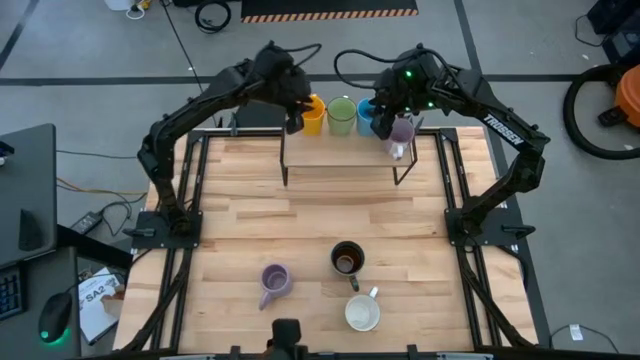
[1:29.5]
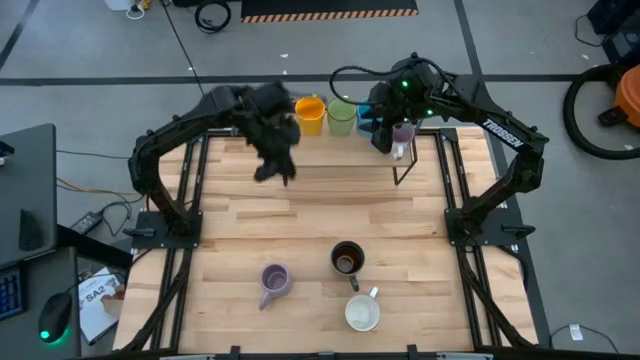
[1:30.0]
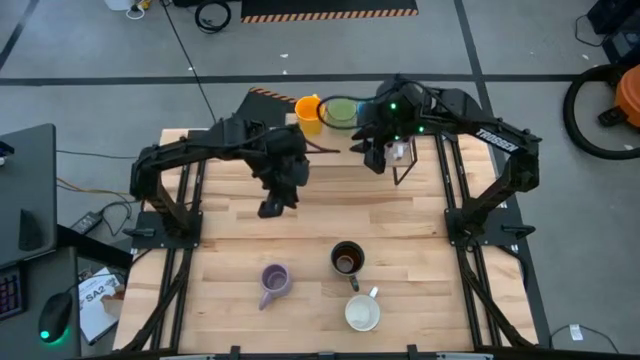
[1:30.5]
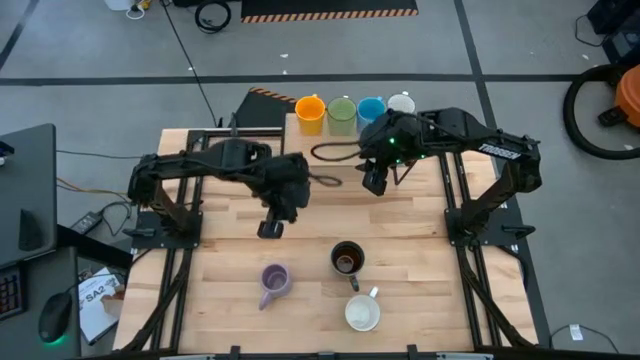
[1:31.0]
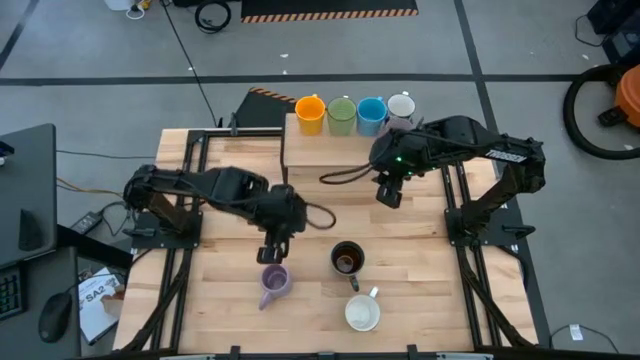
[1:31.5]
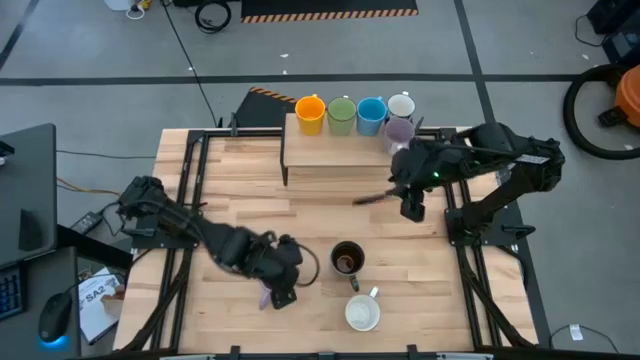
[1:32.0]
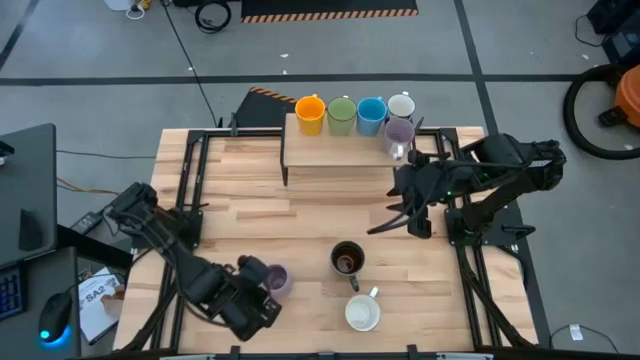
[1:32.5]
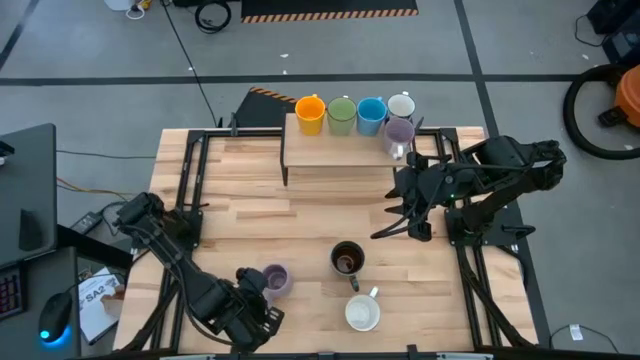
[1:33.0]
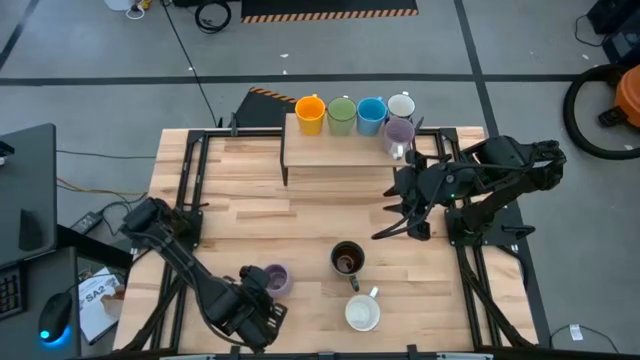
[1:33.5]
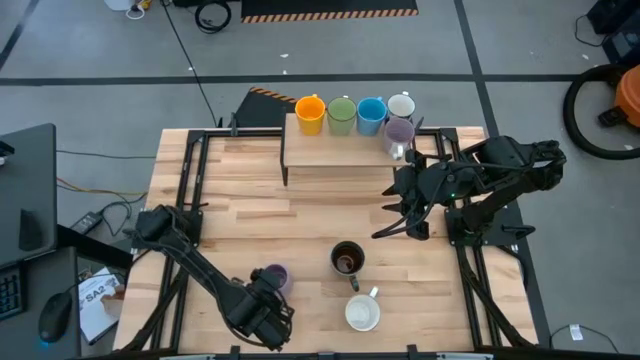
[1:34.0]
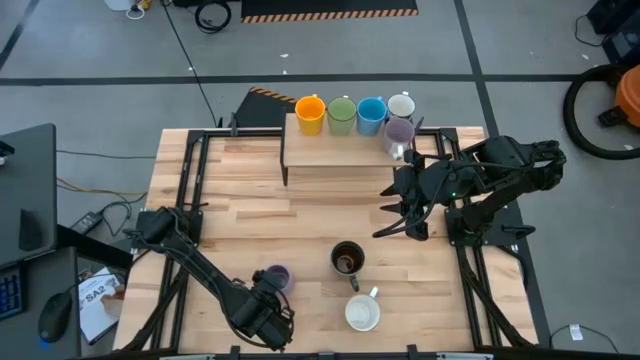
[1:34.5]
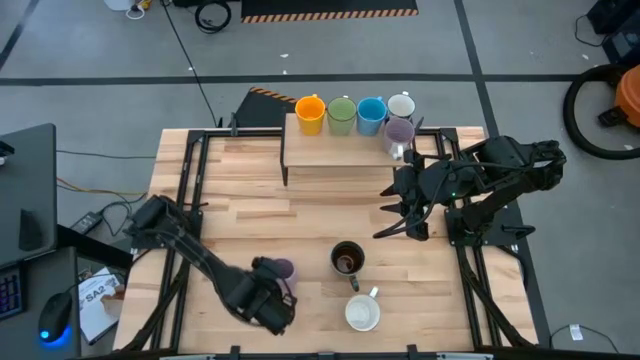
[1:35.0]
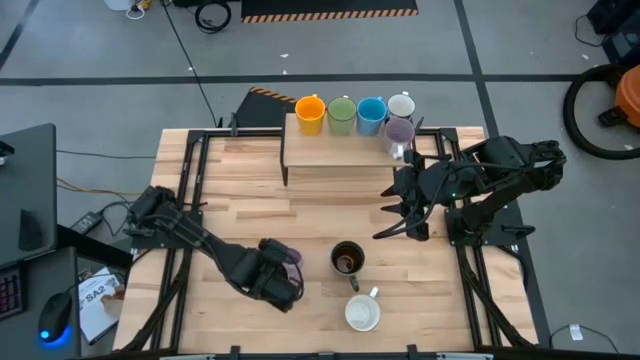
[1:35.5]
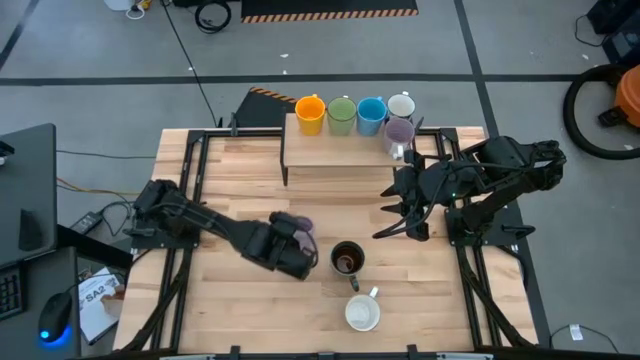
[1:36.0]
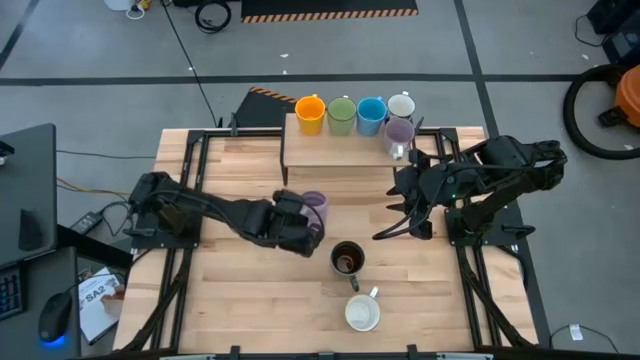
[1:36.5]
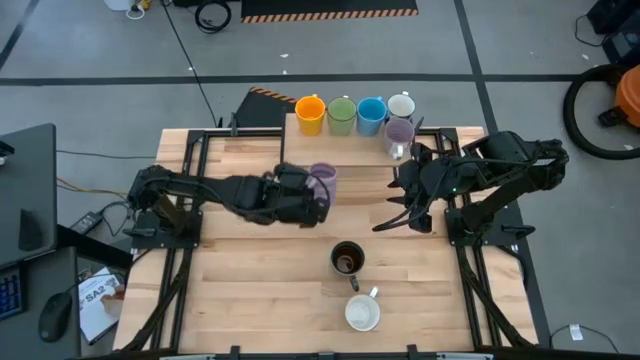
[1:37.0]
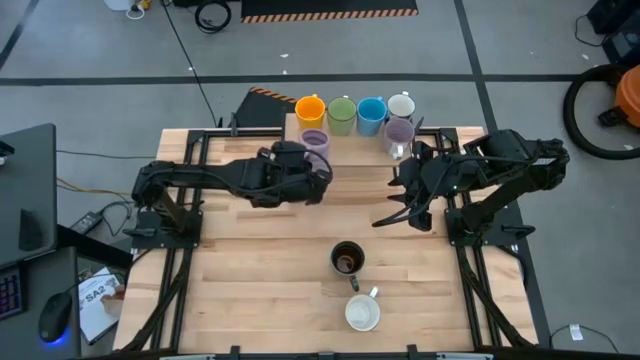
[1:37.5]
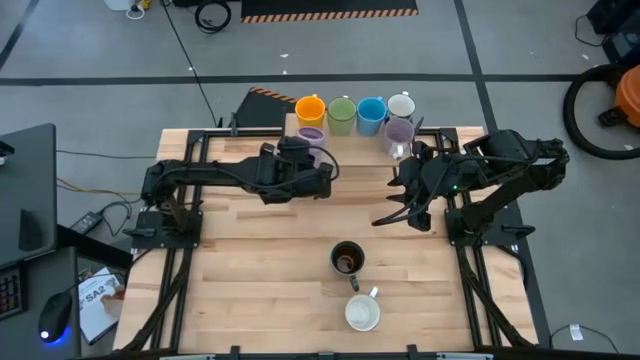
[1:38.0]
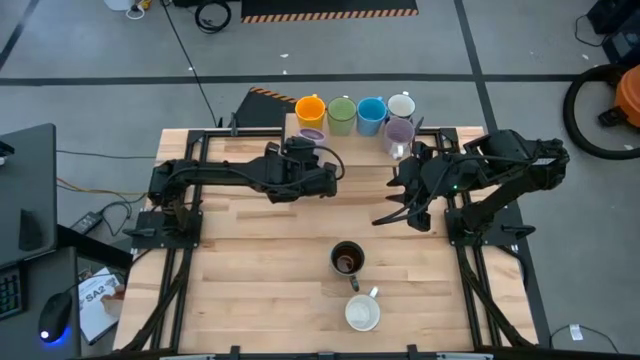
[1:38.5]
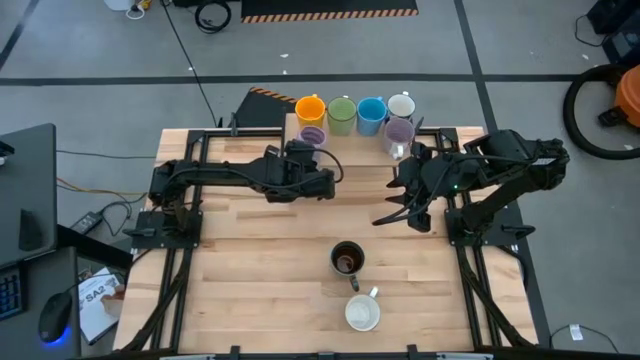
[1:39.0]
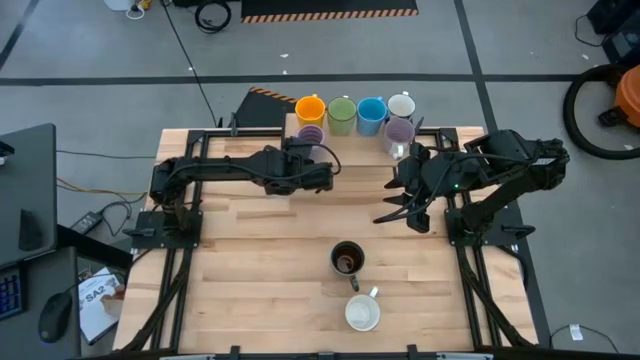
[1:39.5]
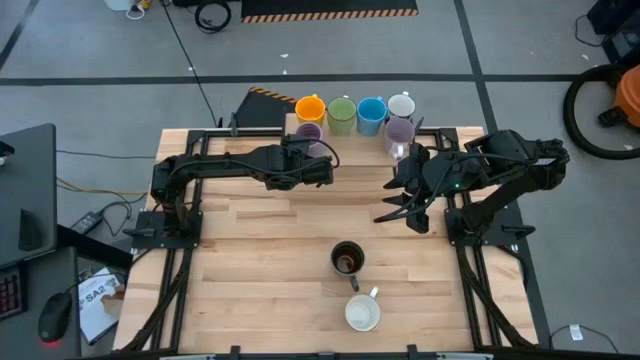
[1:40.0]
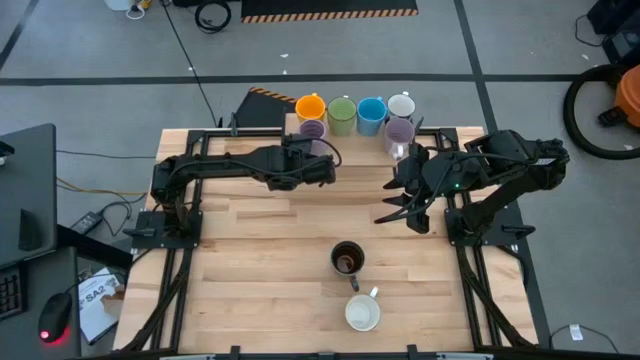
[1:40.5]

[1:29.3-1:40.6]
Task: Place coffee mugs
Put the purple mug on the shelf

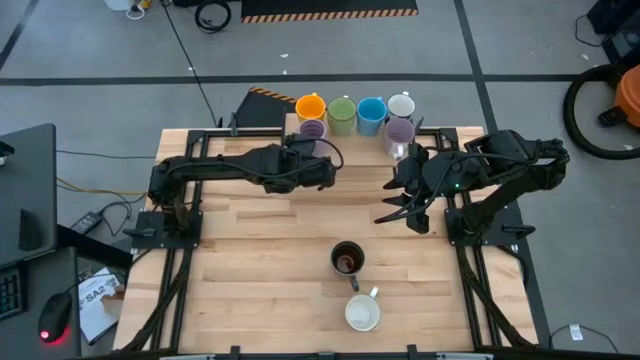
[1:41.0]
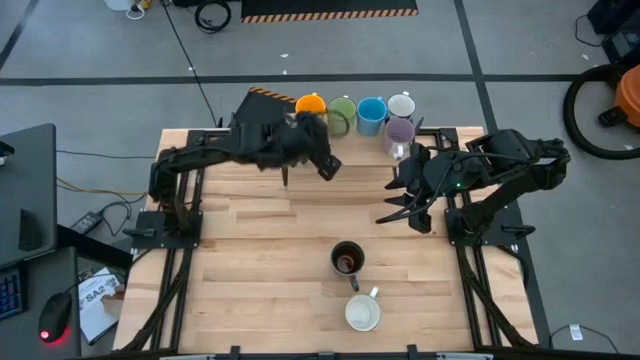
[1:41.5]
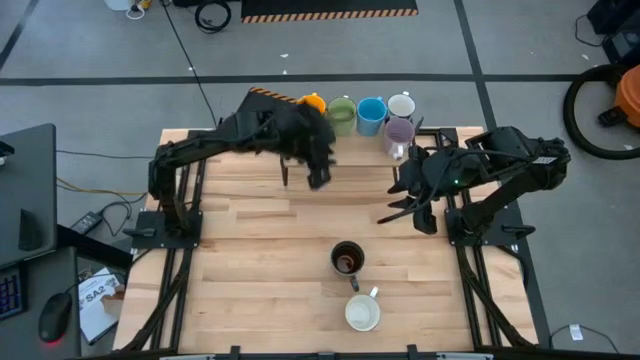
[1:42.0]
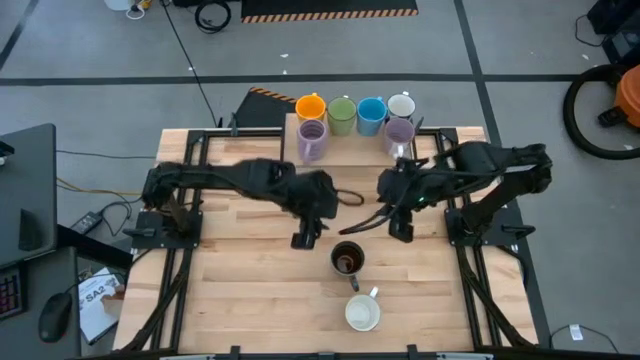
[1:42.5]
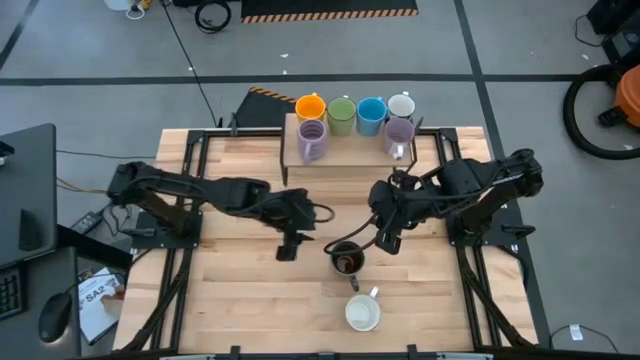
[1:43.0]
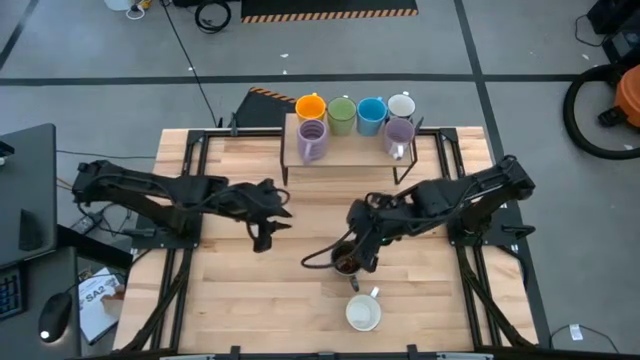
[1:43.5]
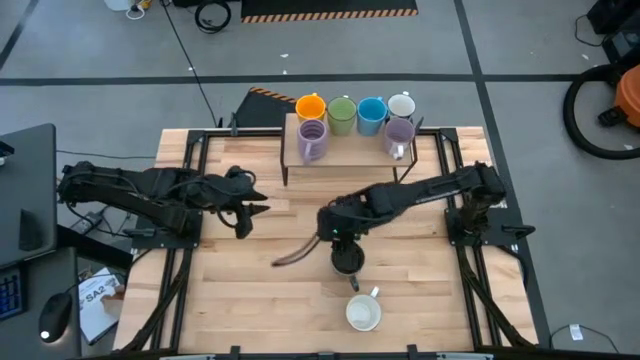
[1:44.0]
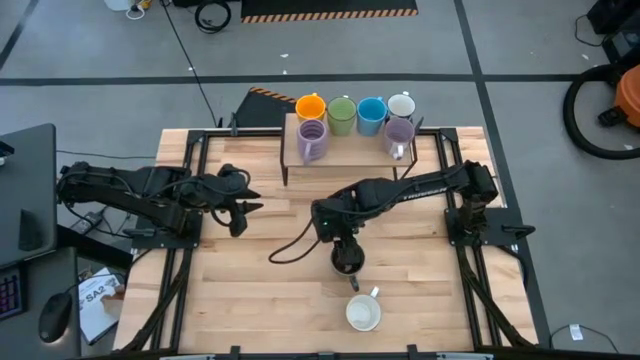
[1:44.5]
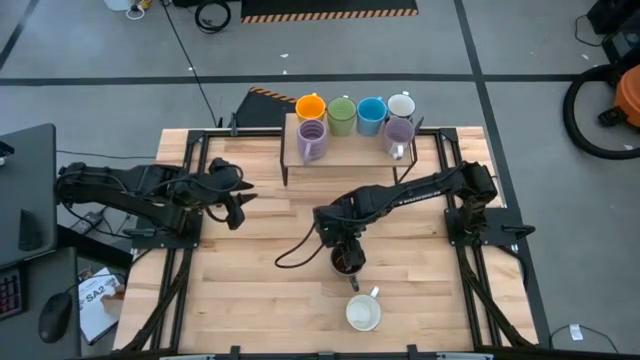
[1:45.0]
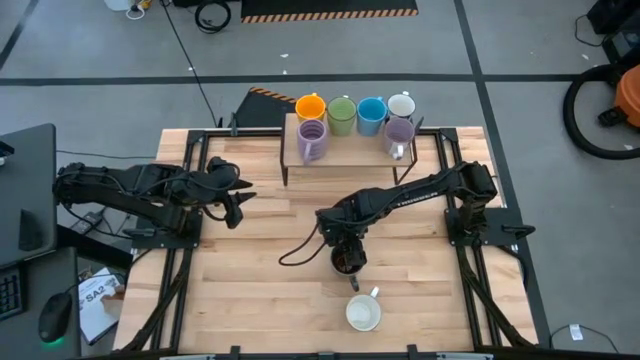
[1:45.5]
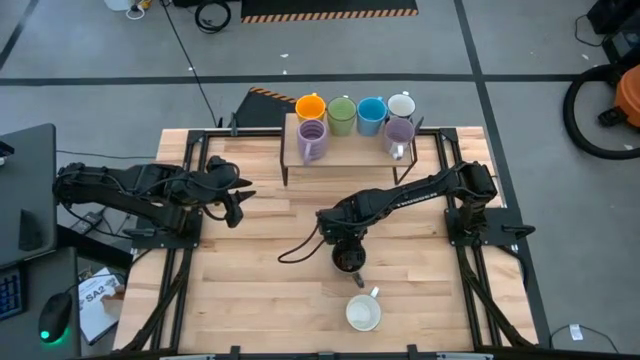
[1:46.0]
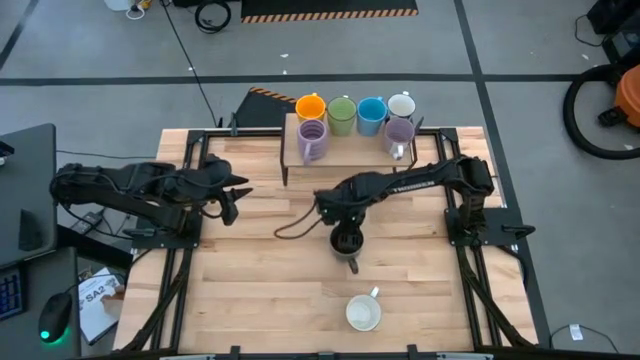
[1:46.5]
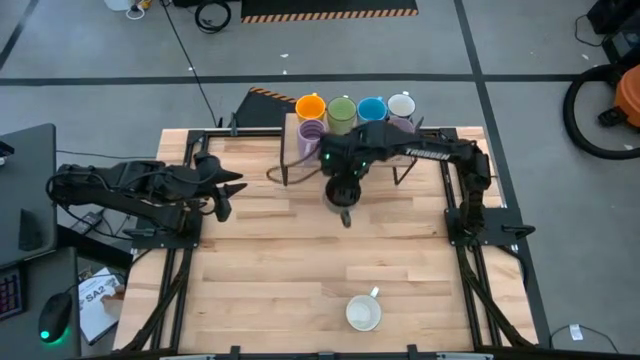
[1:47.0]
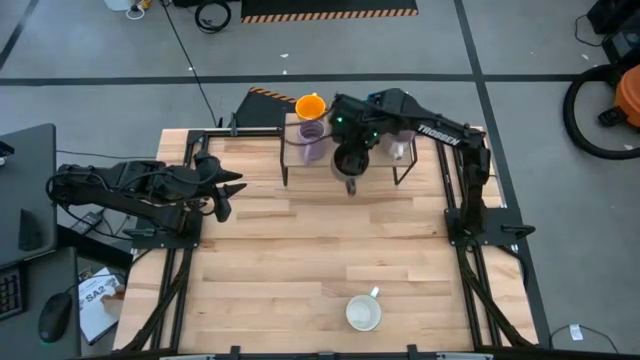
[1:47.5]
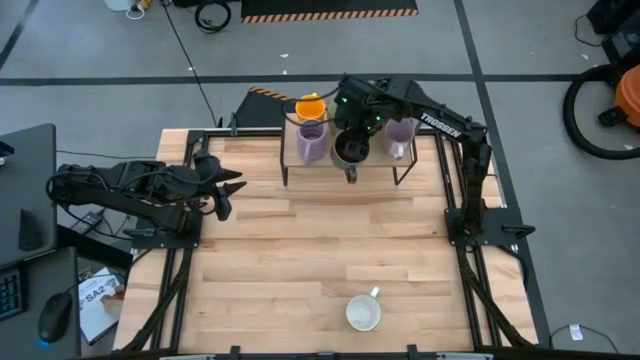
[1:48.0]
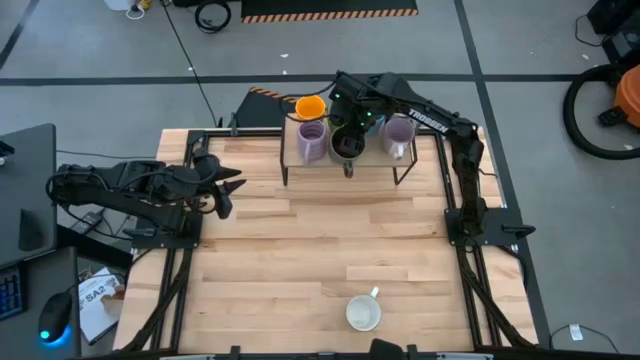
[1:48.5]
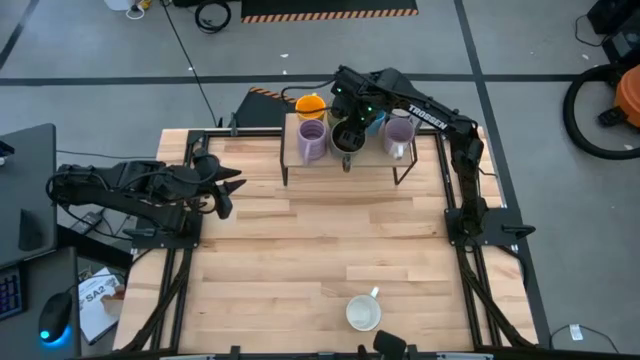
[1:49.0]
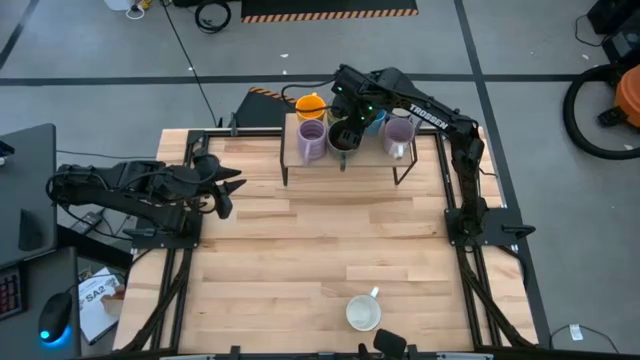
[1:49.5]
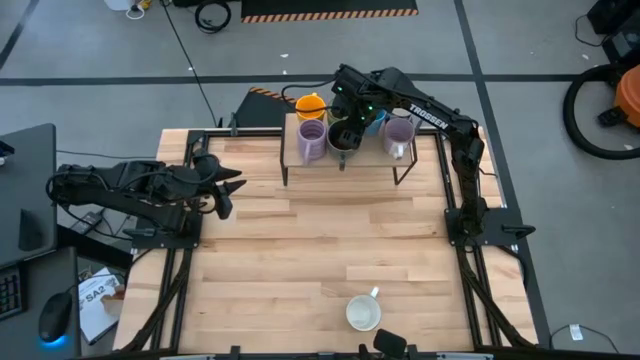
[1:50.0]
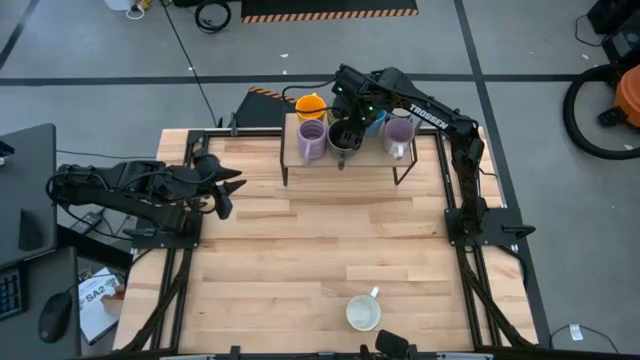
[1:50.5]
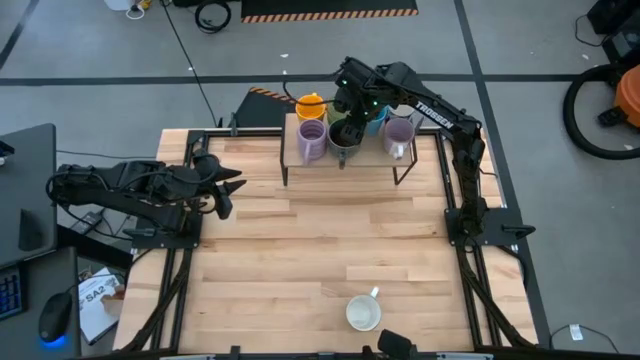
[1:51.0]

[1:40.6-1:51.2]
Put the dark blue patterned mug on the shelf
